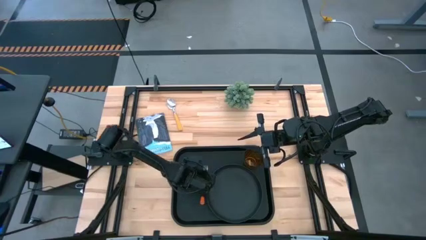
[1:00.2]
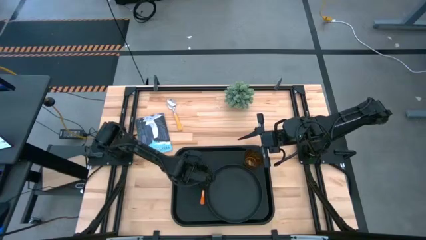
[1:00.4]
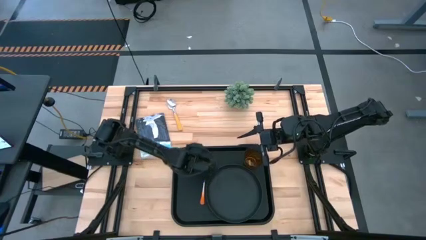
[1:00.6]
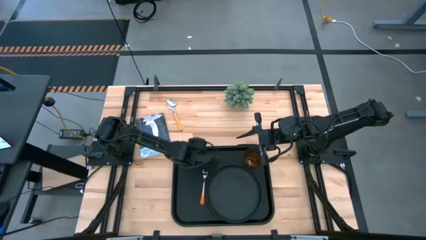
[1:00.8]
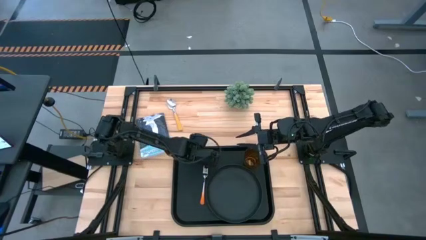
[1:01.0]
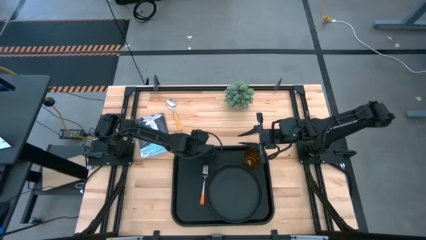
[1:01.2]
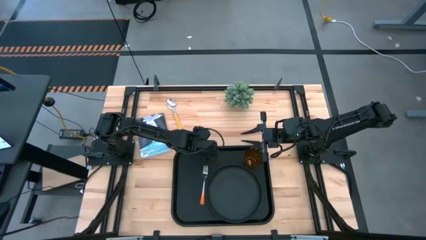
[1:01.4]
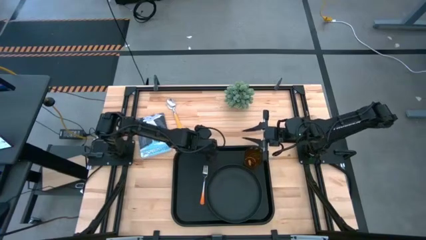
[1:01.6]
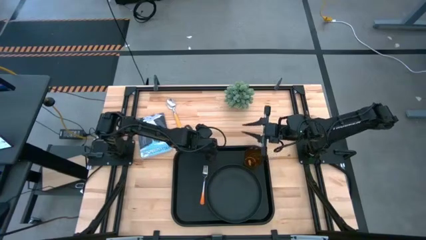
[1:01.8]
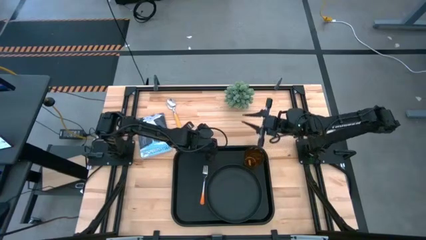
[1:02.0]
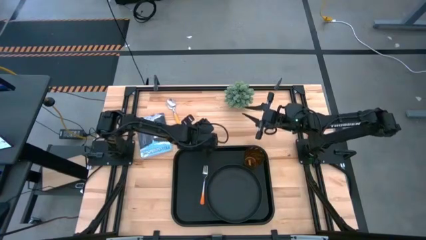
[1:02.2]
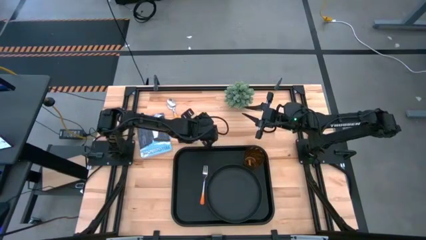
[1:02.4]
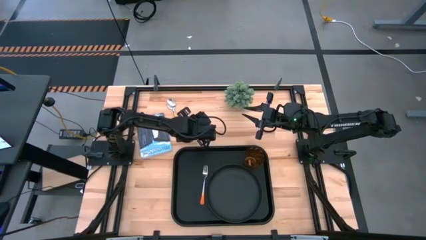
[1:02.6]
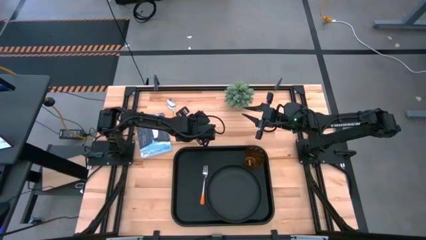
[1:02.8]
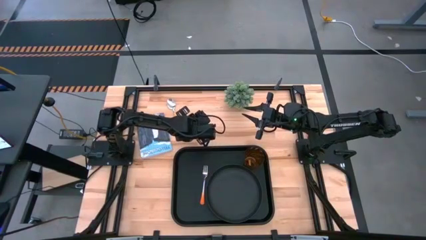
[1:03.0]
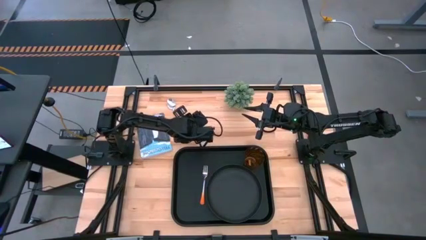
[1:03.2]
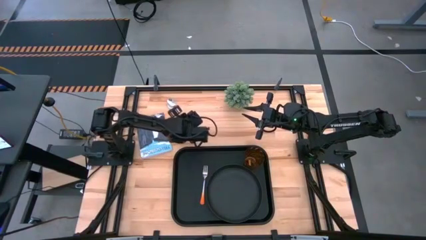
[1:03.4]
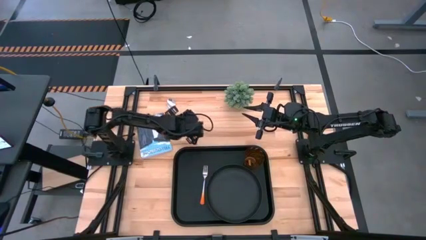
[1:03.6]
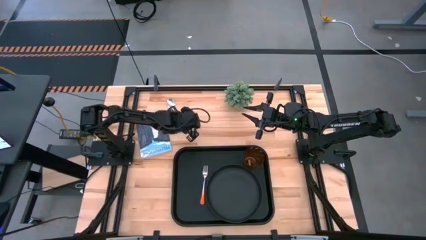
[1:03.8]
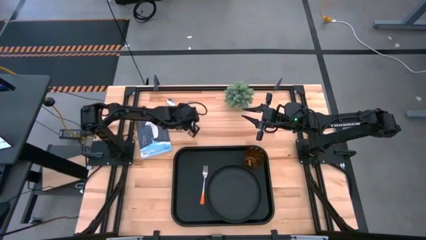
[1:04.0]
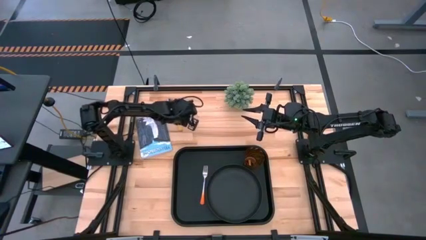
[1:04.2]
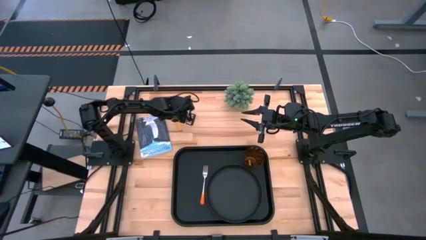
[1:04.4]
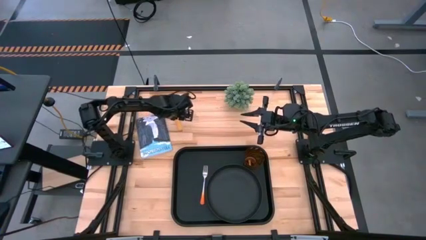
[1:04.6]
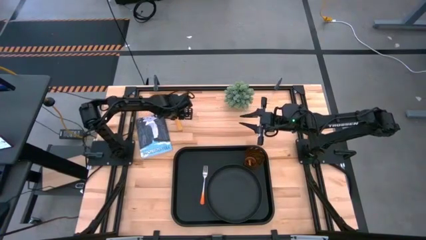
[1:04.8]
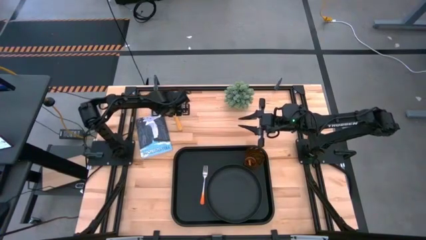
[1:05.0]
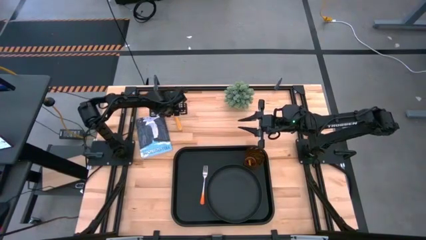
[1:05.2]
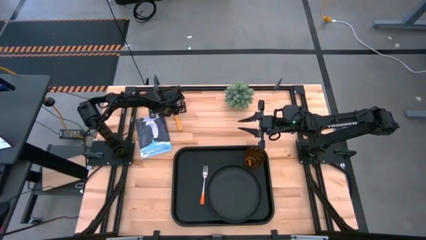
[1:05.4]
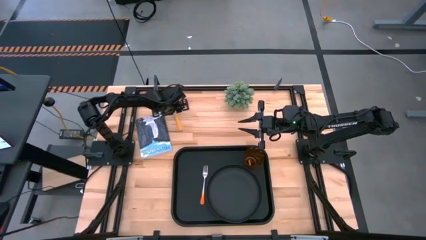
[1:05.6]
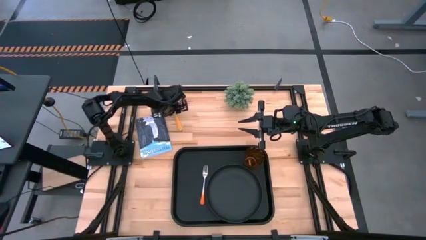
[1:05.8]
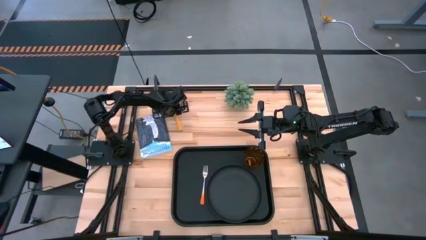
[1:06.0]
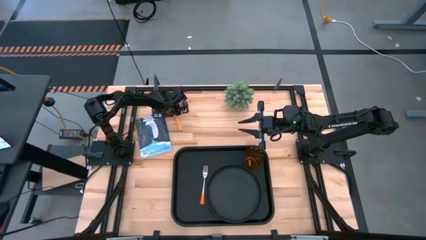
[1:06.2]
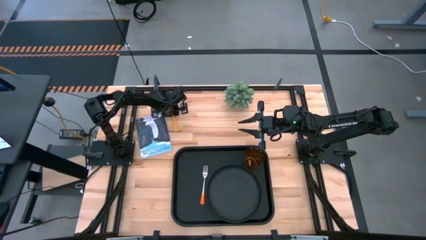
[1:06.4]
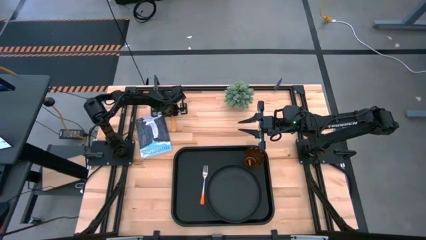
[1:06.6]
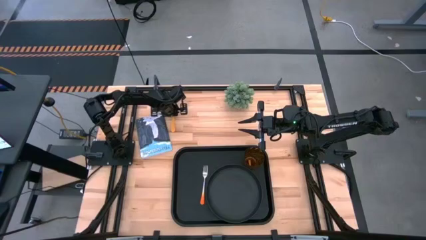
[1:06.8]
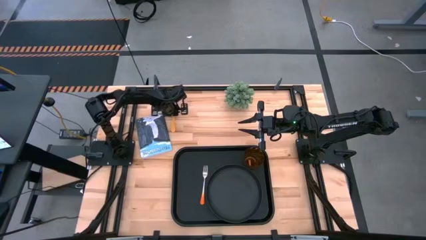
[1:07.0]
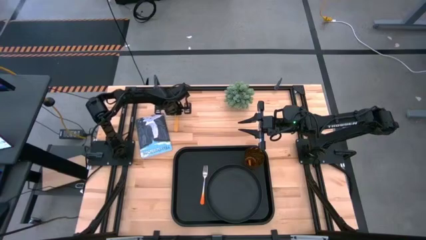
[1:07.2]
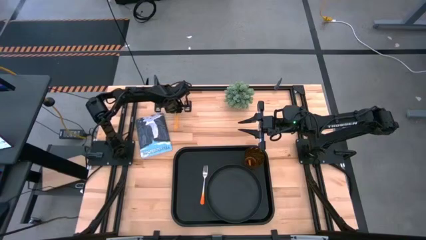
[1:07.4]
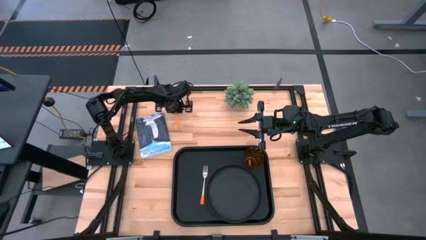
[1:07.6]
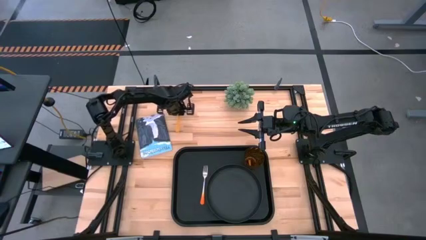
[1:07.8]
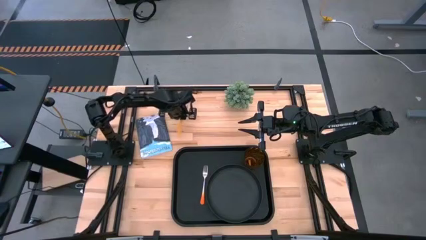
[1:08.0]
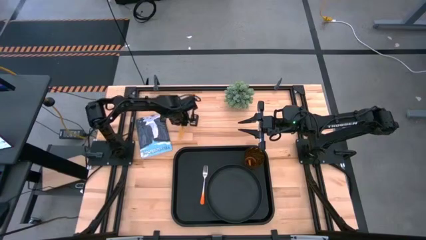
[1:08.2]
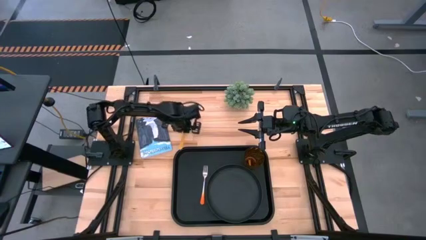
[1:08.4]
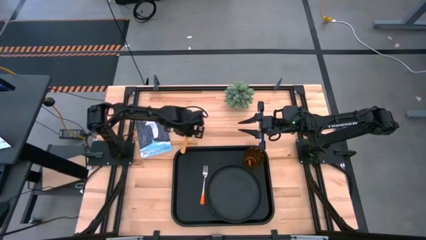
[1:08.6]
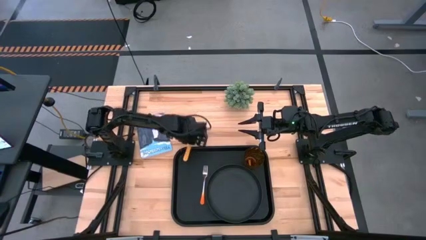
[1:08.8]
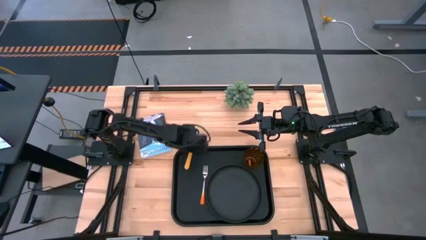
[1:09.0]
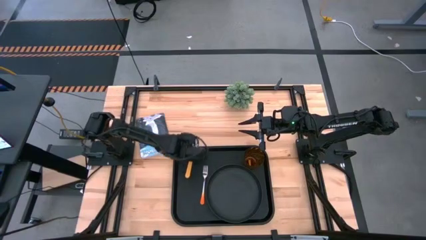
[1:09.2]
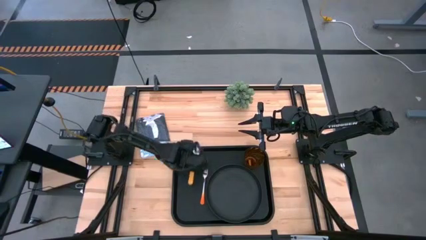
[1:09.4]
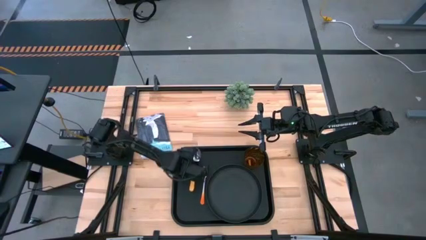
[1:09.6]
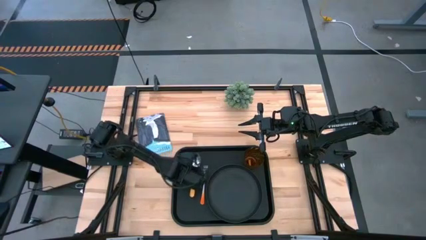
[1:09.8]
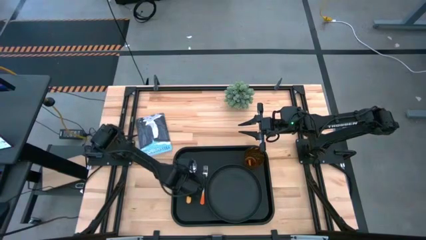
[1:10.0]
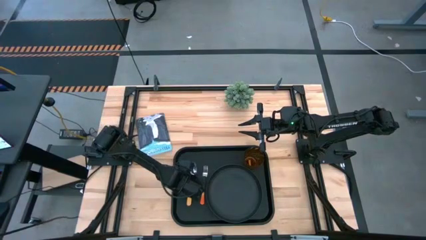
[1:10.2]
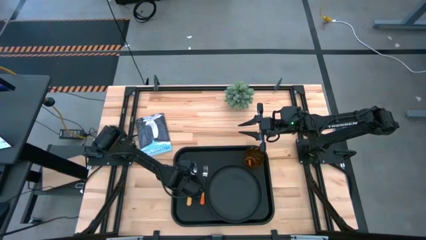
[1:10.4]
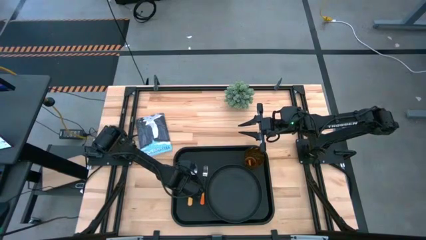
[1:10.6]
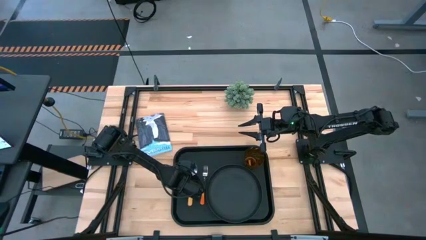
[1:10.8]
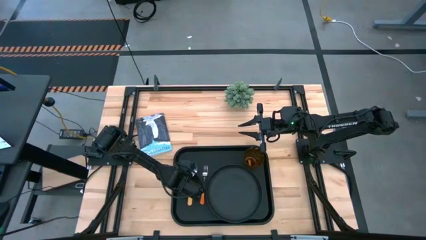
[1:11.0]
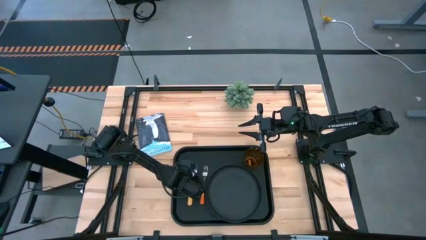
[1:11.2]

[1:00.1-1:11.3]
Task: Pick and place plate/cup/fork/spoon on tray
Put the yellow spoon on the black tray to the left of the fork
